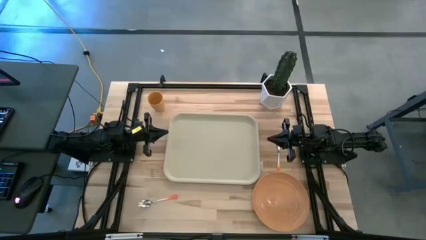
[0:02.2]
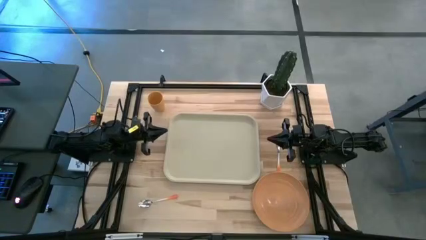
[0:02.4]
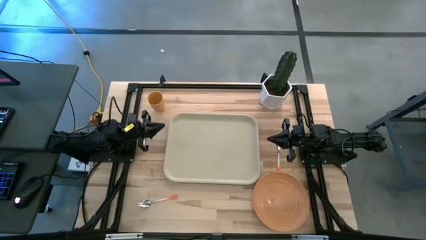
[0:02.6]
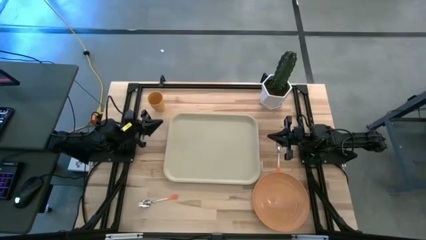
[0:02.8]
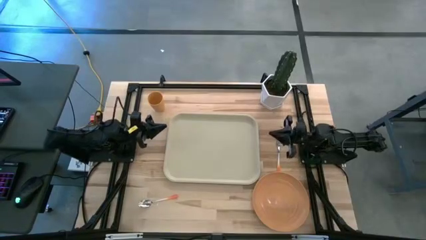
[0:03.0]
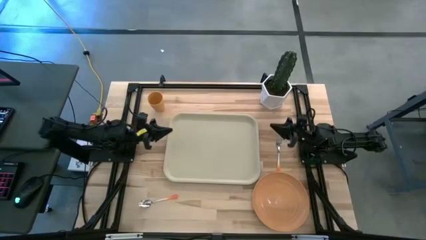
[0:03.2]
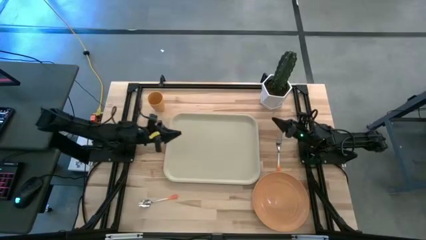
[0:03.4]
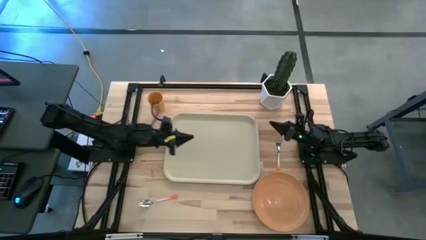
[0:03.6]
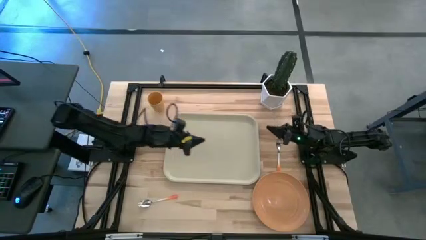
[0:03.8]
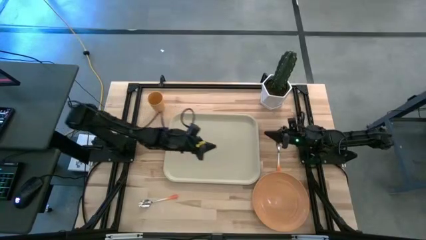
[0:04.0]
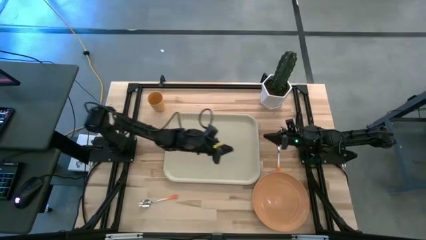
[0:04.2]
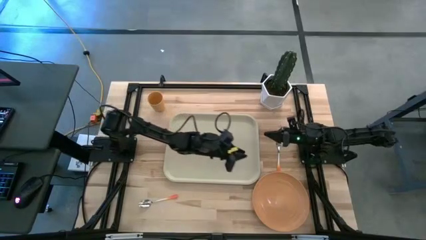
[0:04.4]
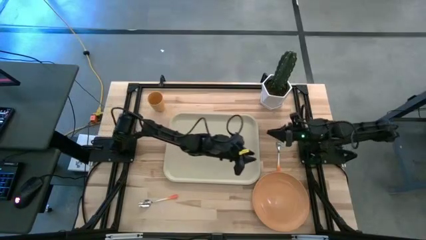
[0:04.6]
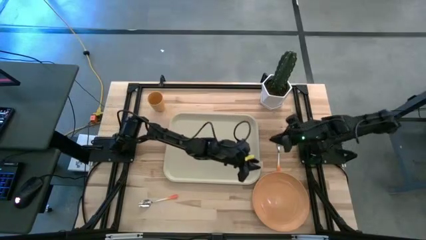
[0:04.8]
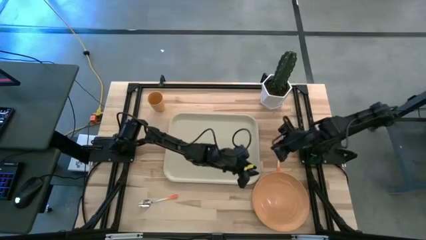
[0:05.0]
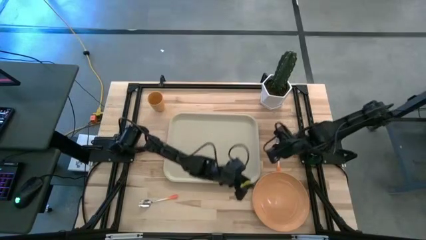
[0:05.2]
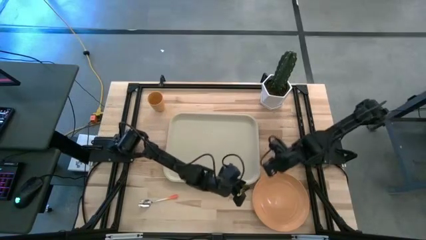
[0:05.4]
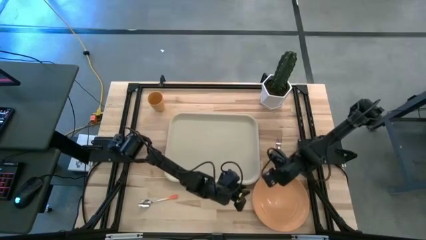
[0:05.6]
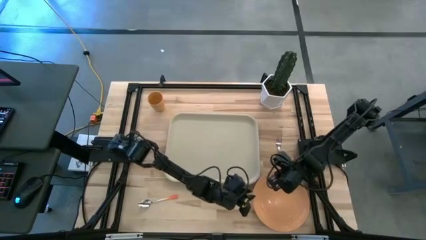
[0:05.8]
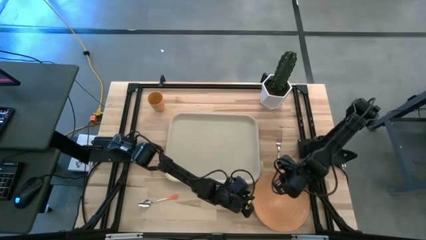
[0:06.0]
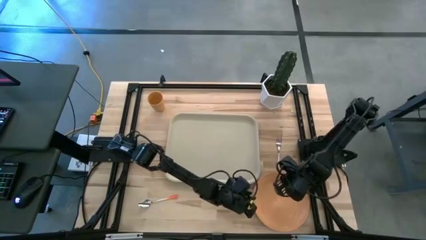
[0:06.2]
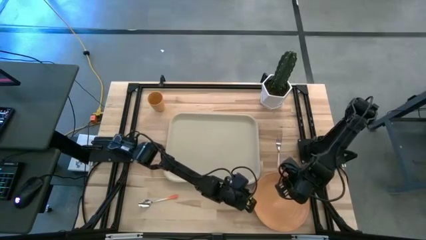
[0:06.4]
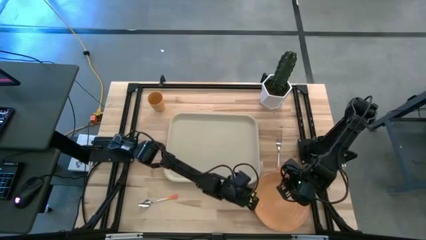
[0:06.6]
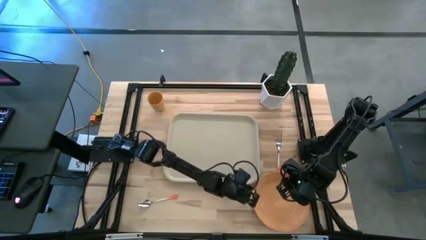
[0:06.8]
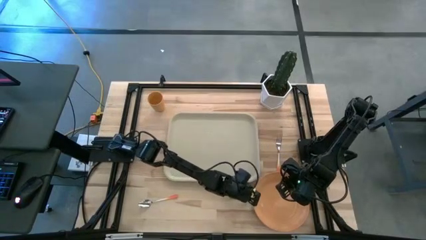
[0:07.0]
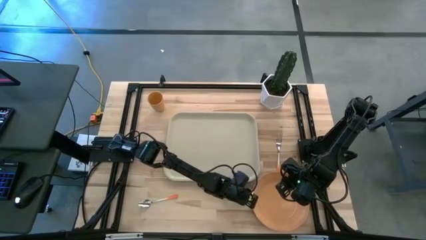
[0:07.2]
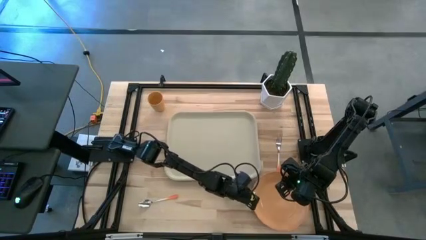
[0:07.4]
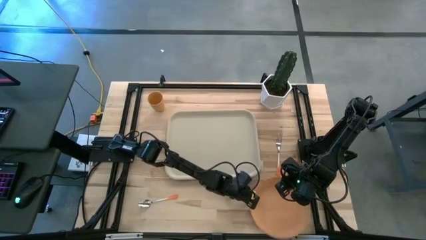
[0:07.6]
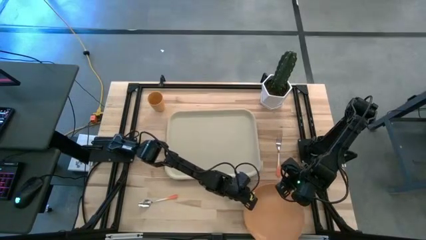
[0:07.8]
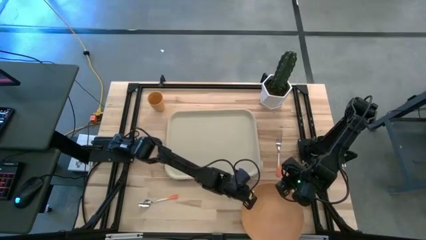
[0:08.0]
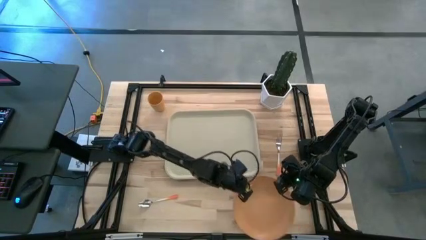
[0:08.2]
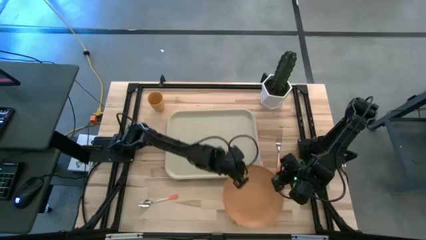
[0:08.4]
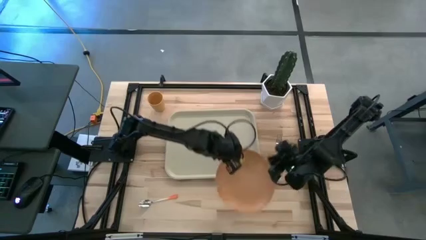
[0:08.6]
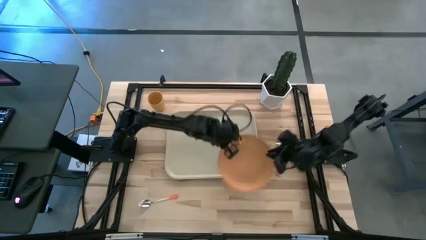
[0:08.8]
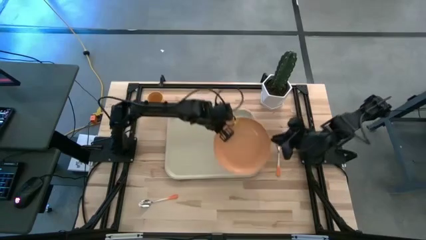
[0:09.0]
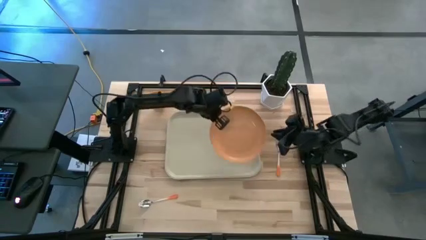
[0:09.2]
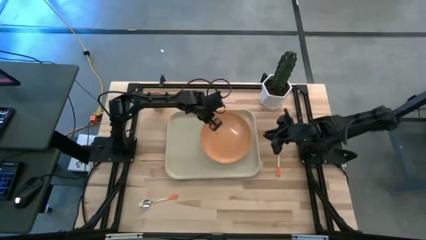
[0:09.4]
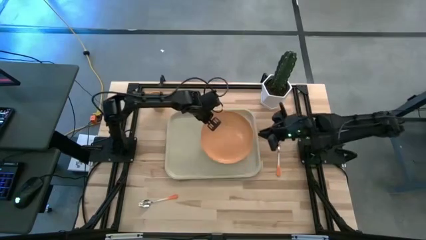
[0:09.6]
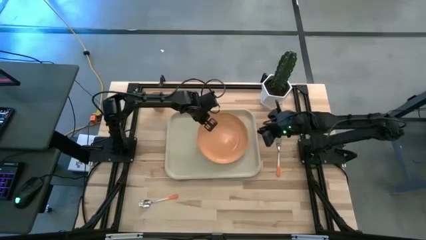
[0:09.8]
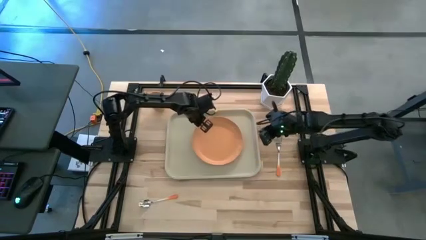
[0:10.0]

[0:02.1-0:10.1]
Task: Pick and place plate/cup/fork/spoon on tray
Put the orange plate on the center of the white serving tray

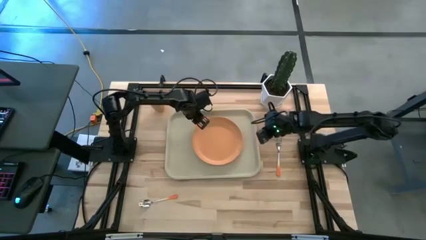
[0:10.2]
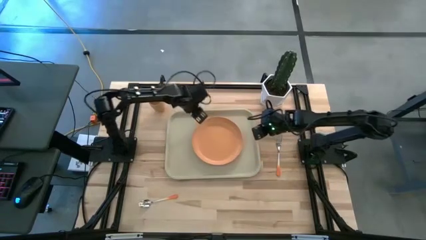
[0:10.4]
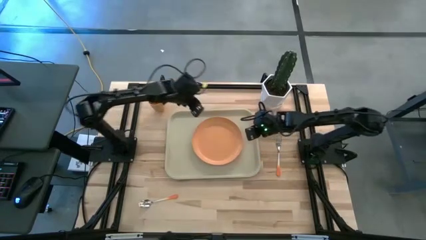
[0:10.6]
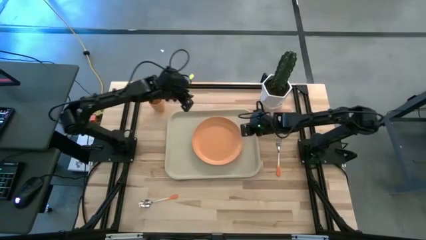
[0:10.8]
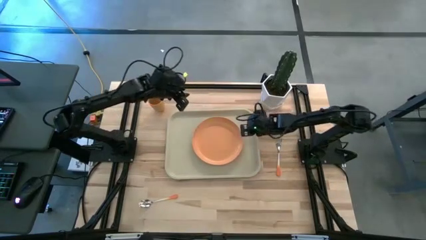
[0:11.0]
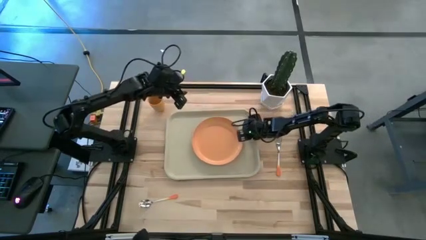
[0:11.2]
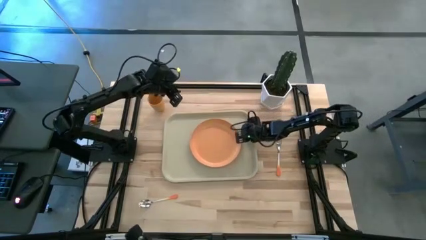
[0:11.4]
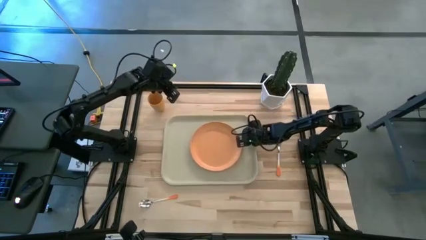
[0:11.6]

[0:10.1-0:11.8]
Adjust the white serving tray

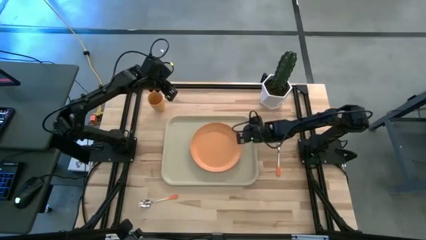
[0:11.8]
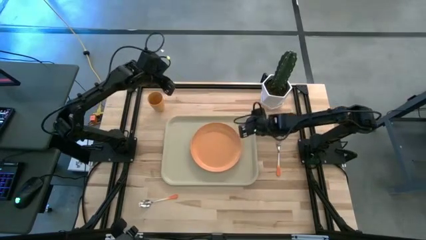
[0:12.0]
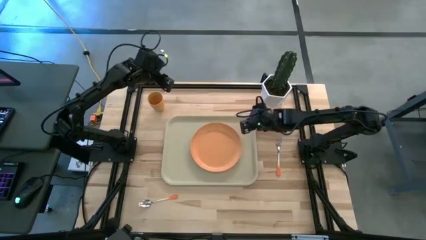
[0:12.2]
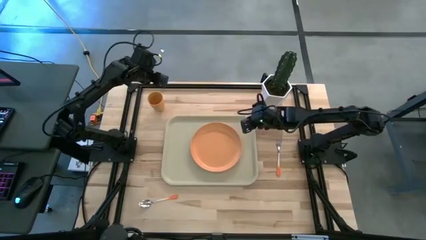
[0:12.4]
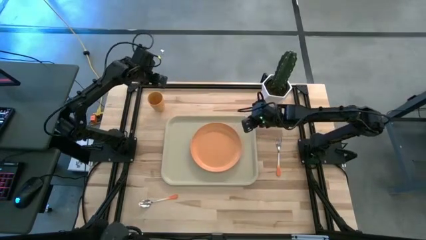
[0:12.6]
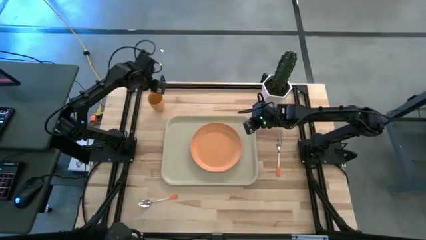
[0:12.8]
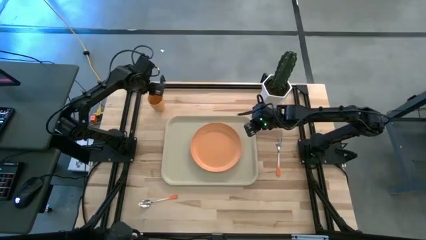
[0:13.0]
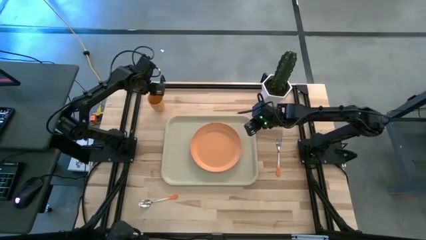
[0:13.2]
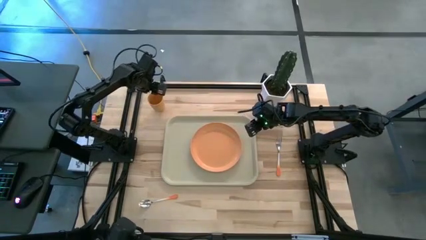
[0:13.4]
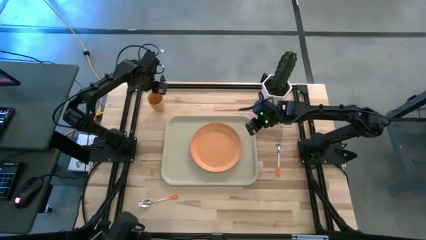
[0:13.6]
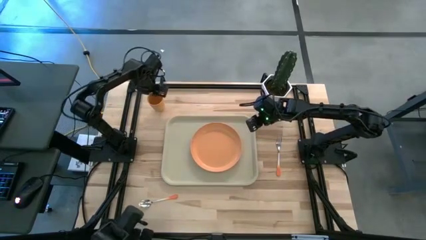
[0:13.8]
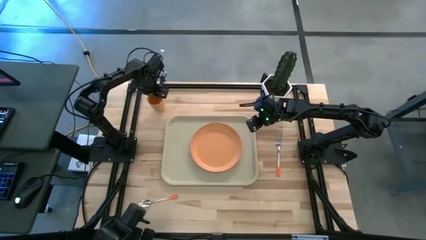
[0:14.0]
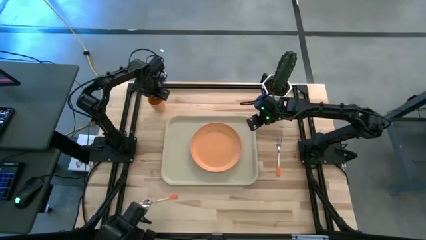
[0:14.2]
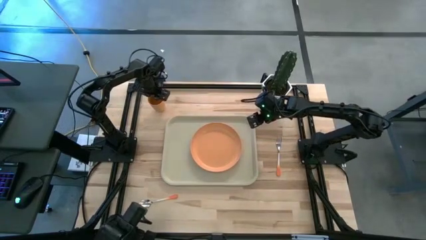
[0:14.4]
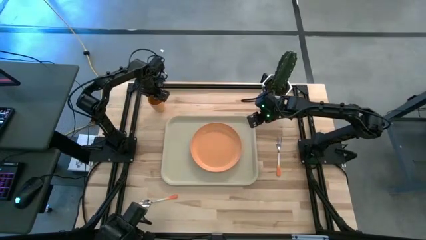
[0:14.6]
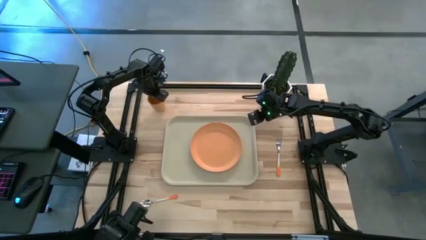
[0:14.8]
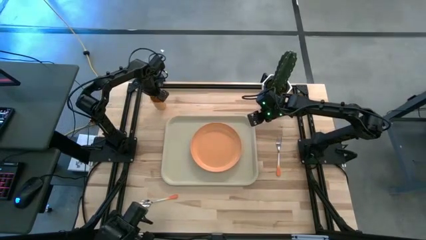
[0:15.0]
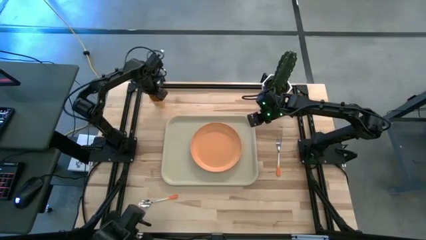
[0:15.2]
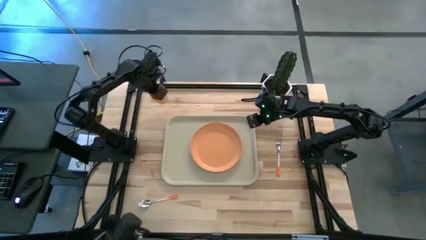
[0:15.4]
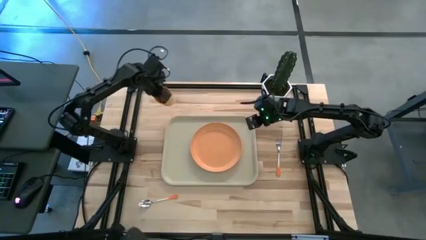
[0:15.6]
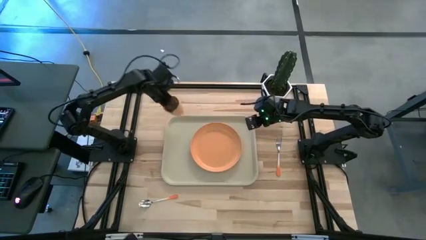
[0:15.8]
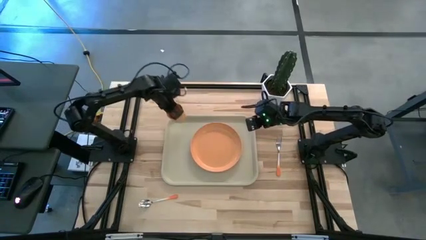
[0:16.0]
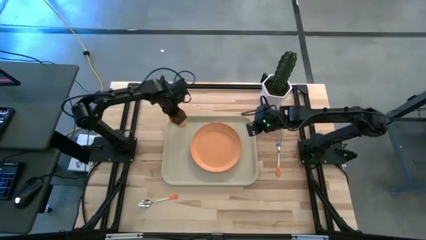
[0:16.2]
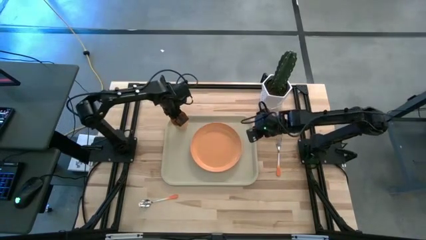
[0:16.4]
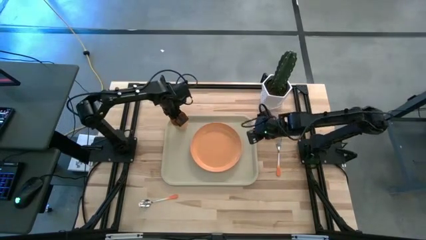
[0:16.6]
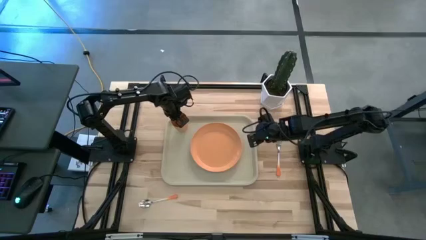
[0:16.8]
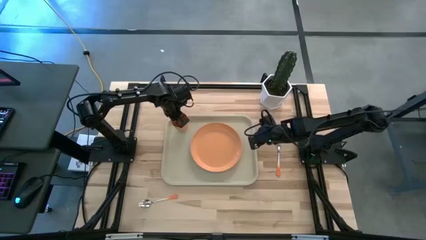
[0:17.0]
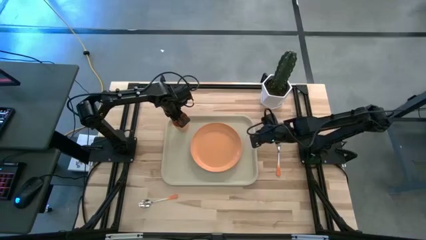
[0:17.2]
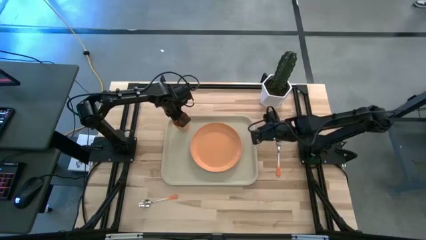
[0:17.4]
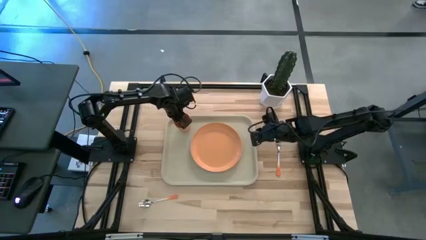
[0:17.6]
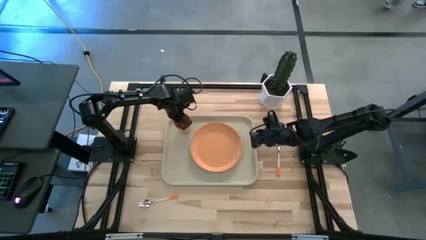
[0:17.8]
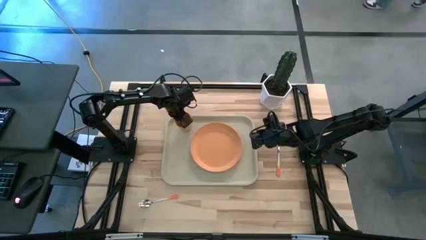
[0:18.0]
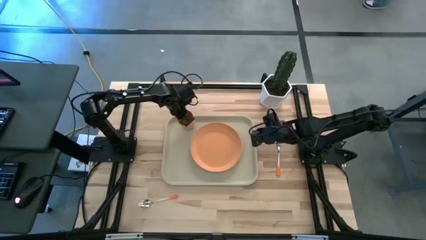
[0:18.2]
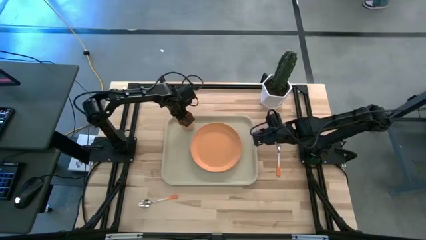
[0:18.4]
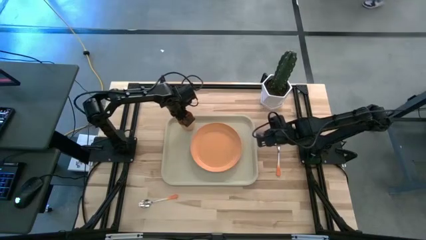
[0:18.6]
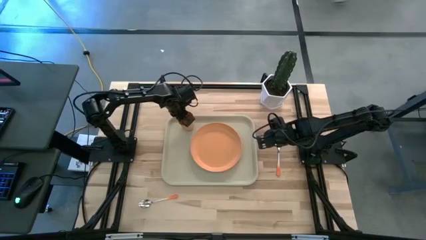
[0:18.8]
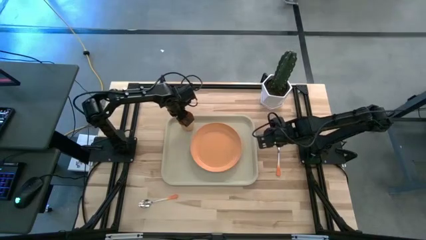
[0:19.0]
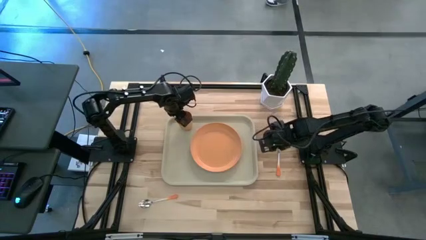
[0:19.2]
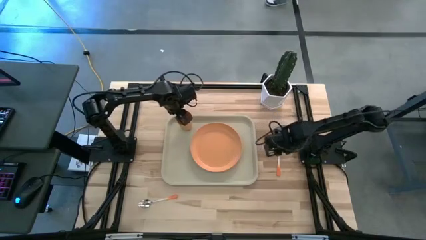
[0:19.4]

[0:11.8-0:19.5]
Put the orange cup on the serving tray to the top left of the orange plate
